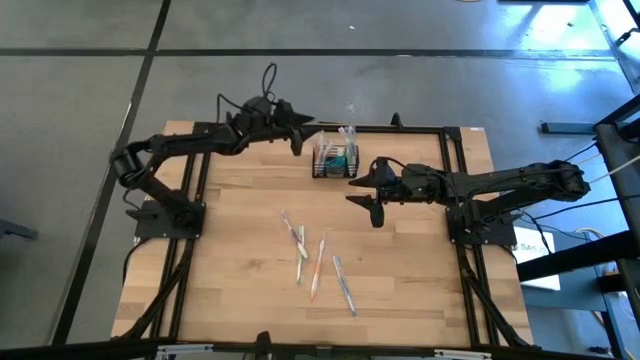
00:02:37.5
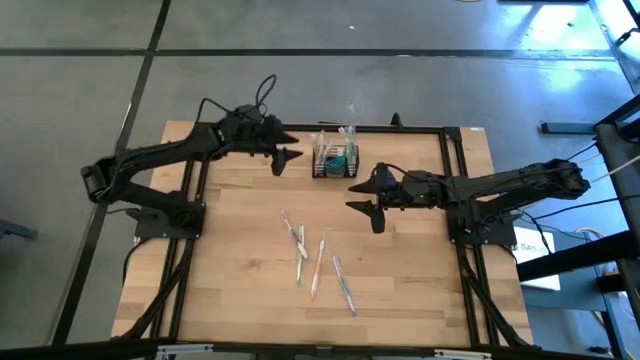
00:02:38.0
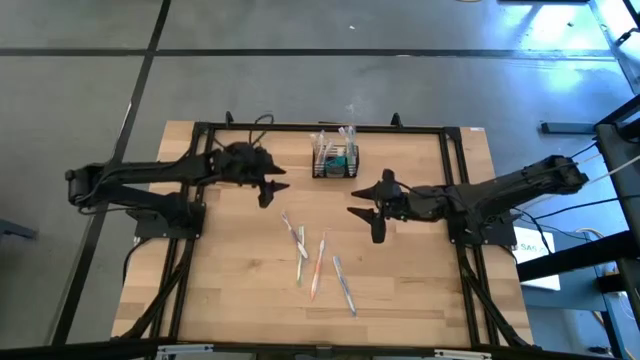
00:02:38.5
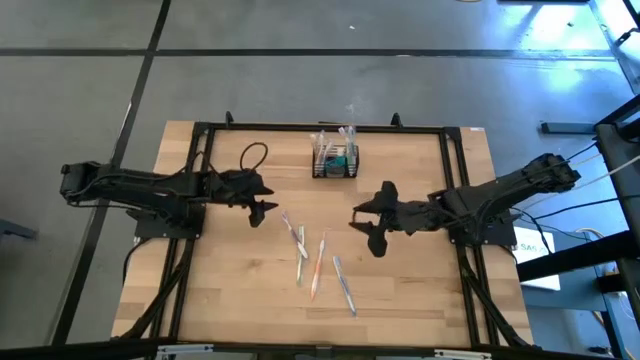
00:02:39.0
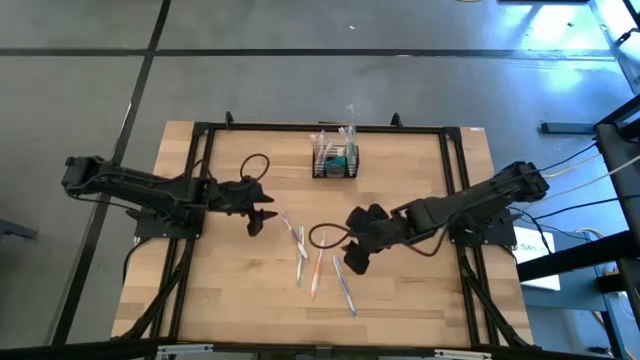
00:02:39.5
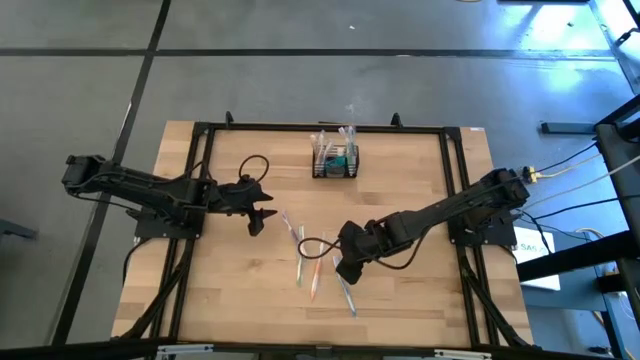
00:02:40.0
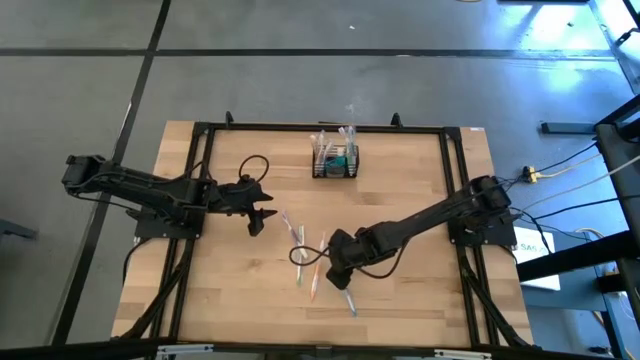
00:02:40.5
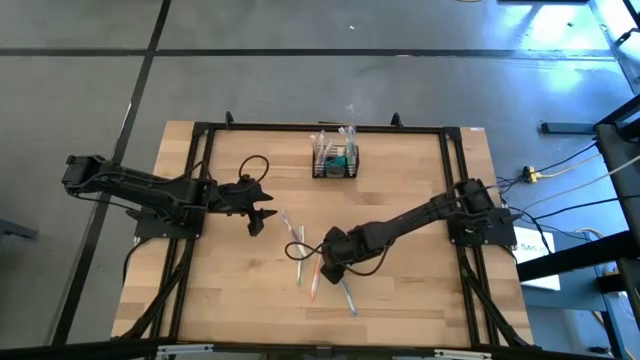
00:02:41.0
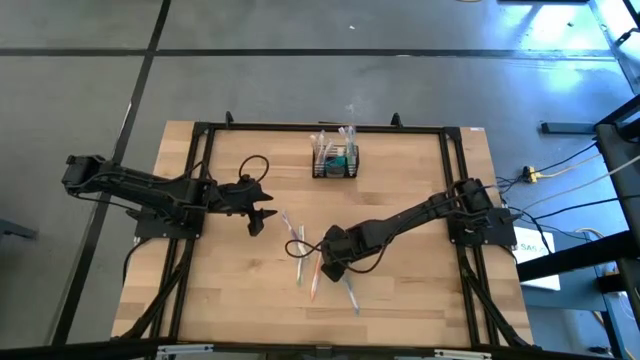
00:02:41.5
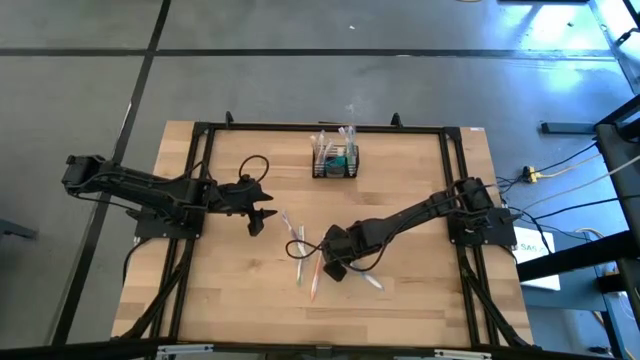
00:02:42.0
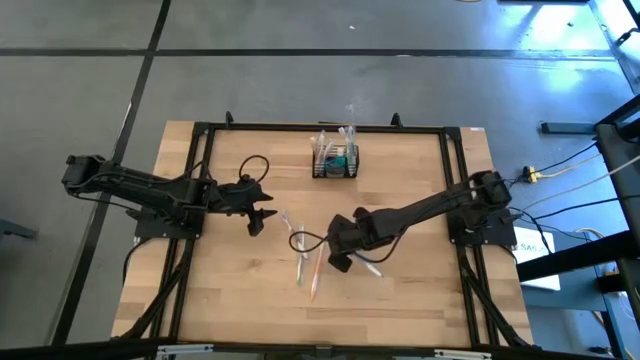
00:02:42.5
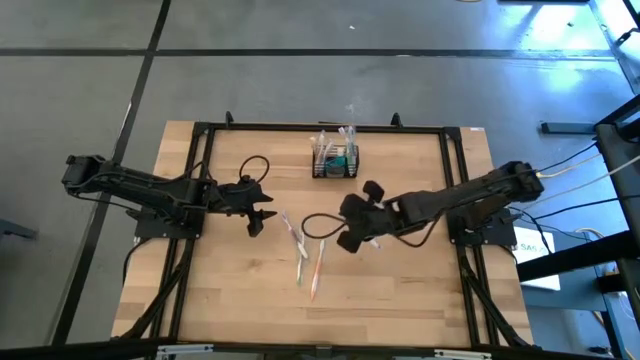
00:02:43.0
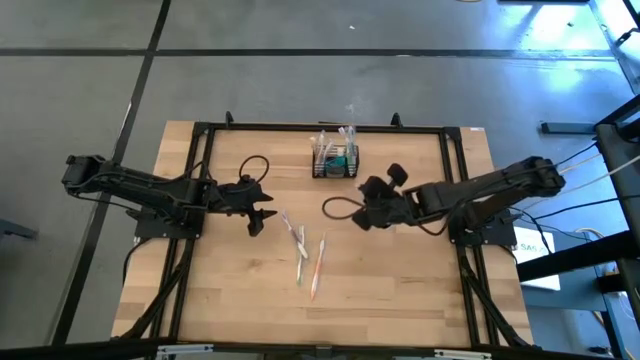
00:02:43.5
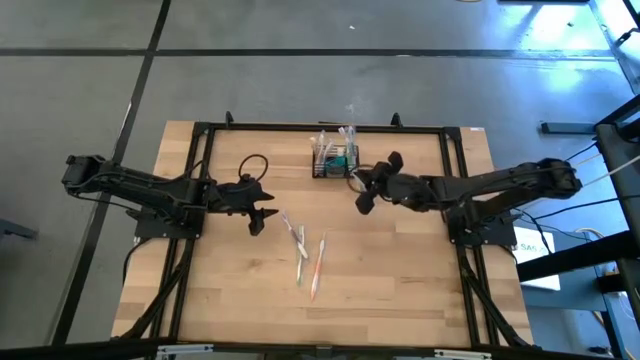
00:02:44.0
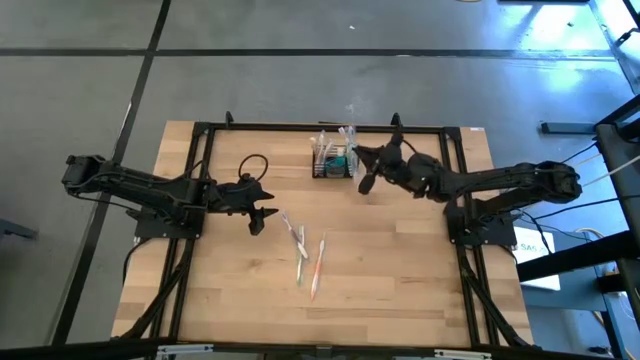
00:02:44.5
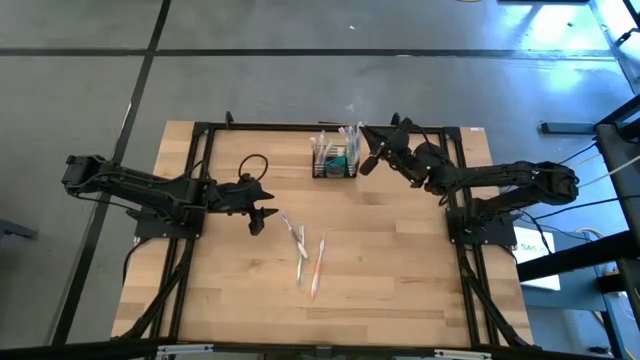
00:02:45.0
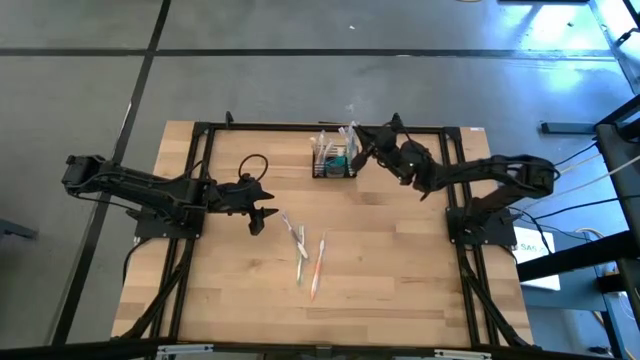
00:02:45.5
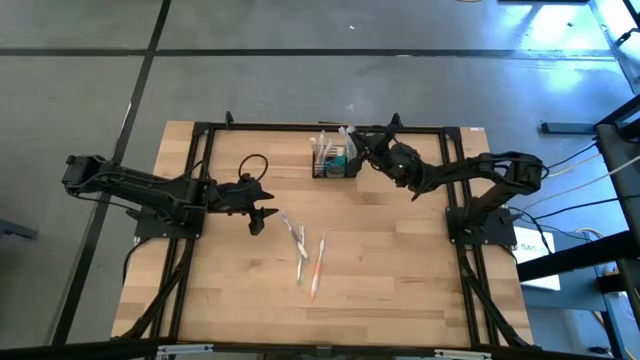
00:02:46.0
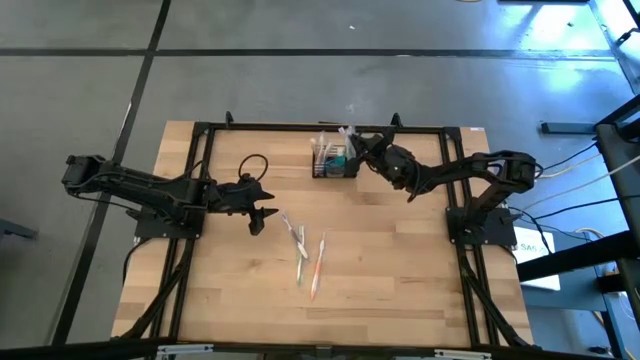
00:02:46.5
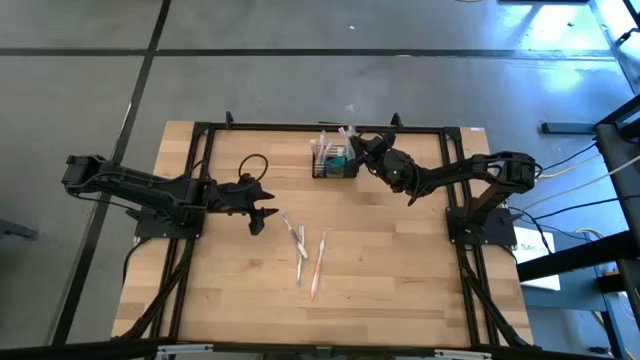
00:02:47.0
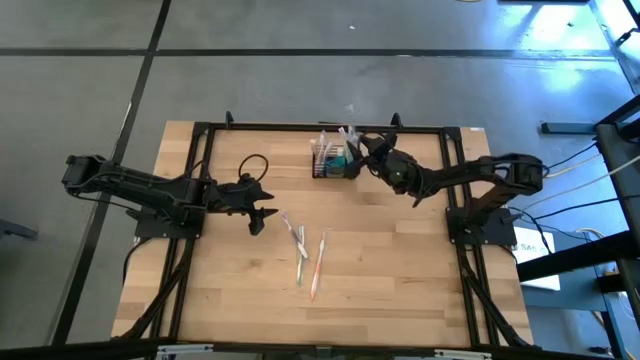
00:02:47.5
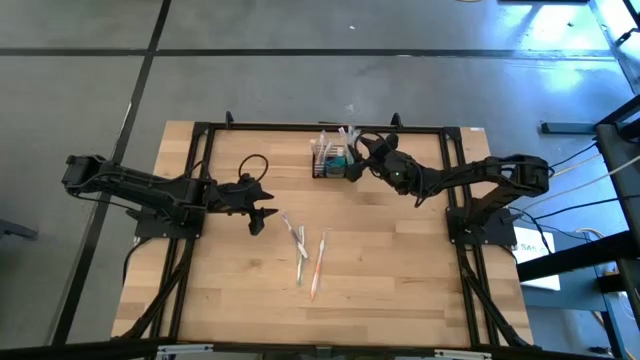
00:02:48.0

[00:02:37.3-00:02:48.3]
Task: Pick & Place toothbrushing station
Put the blue toothbrush in the right section of the wire organizer

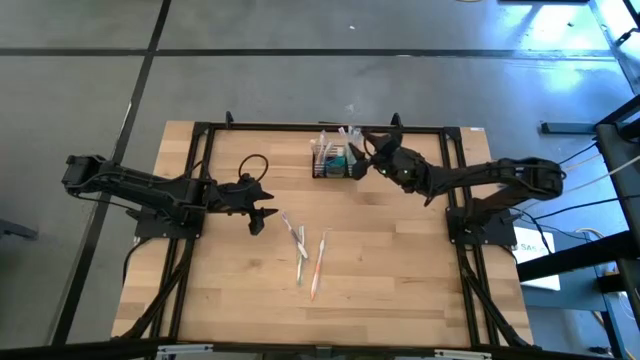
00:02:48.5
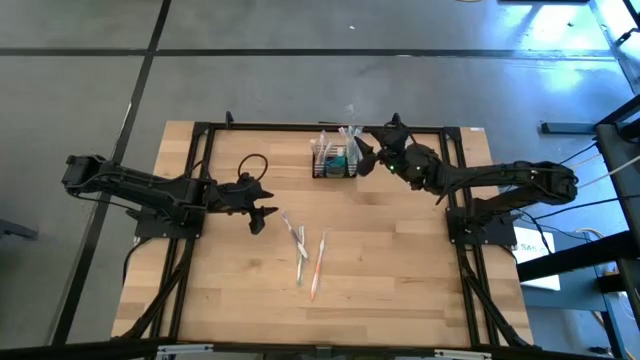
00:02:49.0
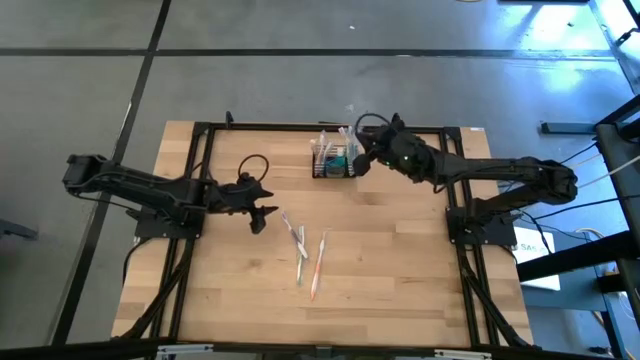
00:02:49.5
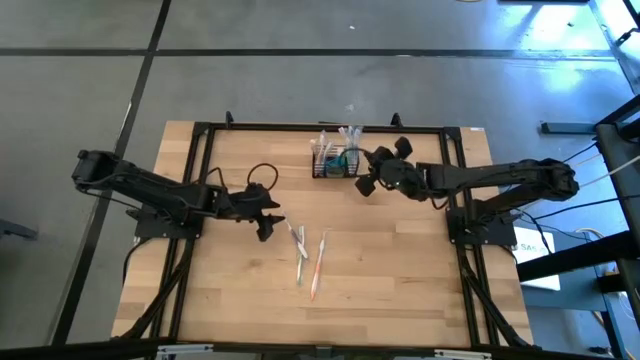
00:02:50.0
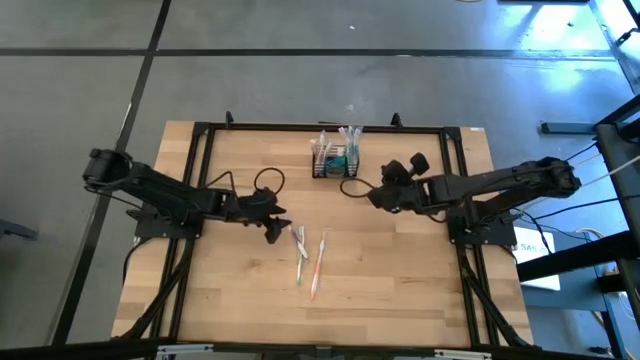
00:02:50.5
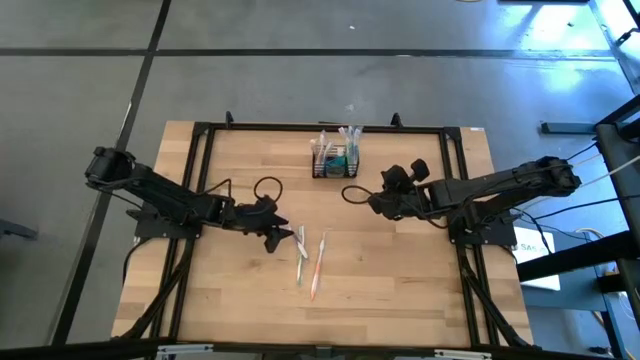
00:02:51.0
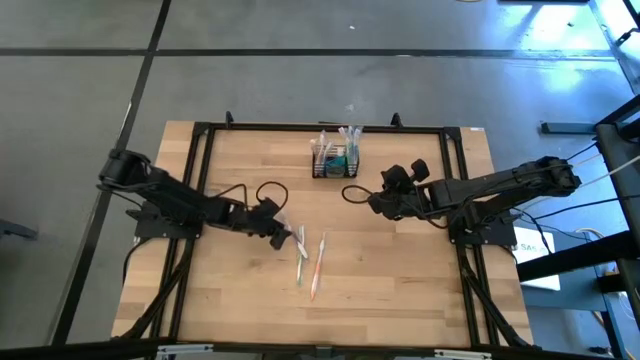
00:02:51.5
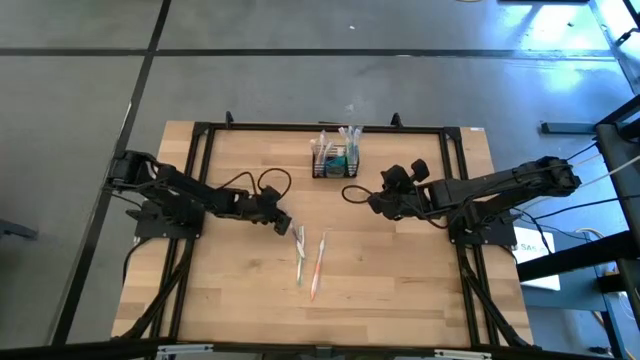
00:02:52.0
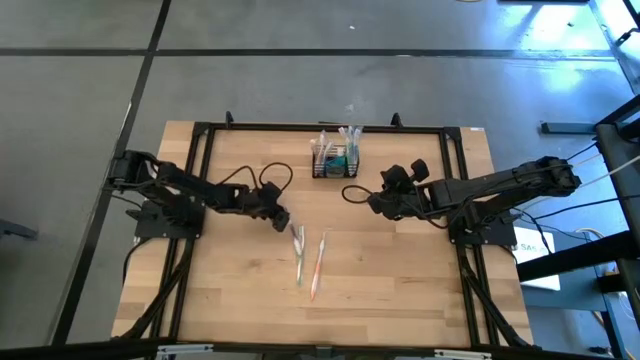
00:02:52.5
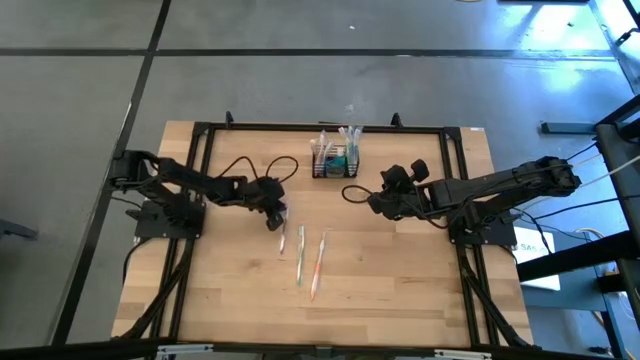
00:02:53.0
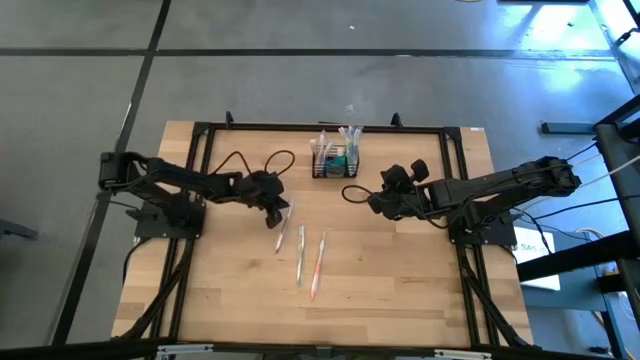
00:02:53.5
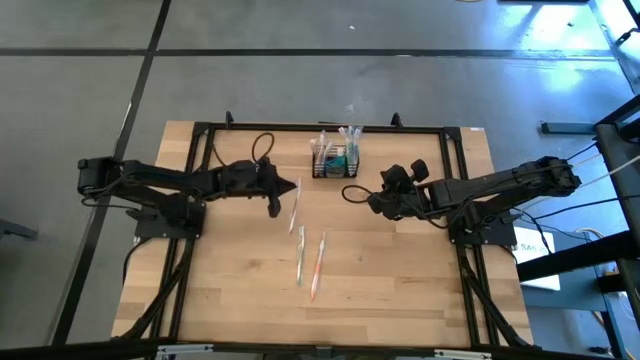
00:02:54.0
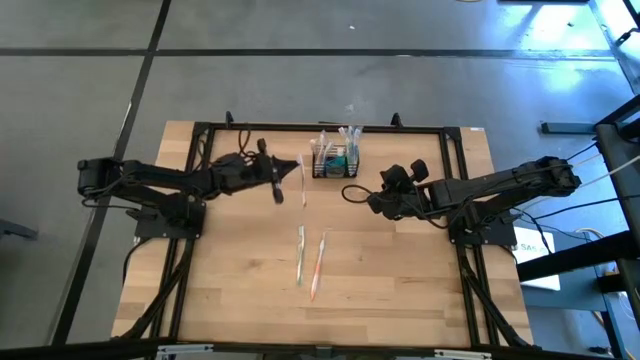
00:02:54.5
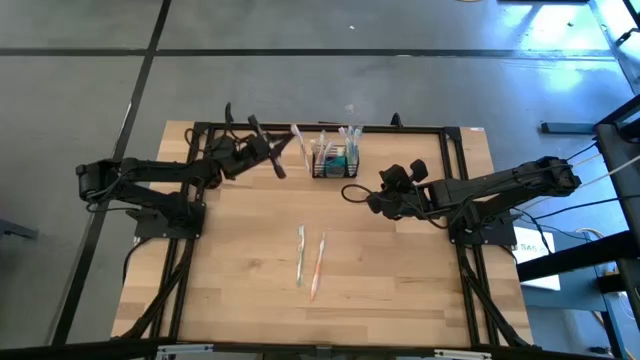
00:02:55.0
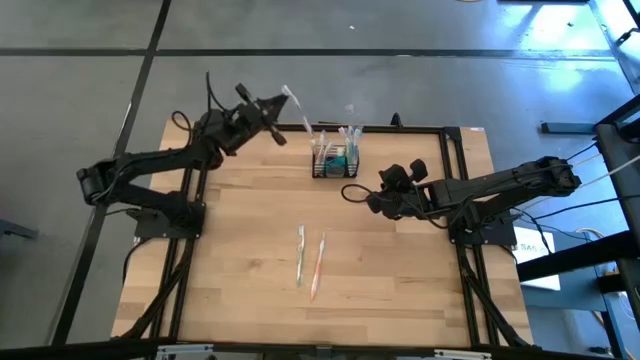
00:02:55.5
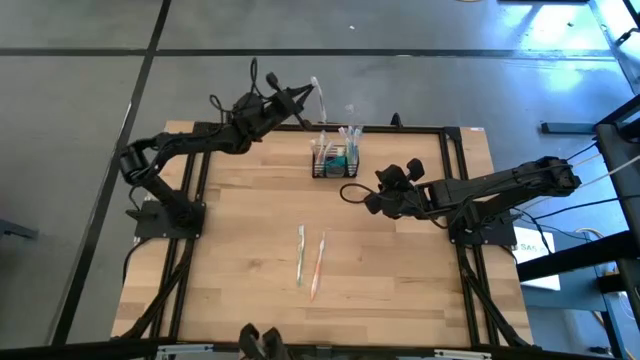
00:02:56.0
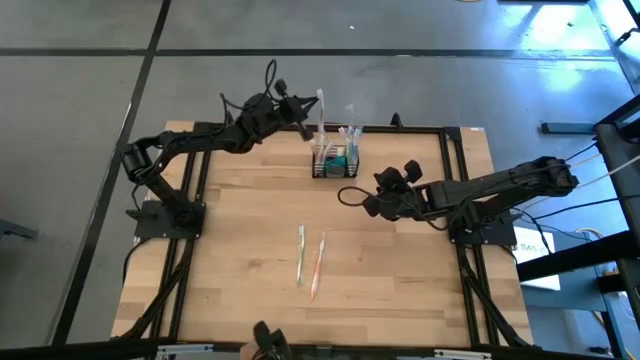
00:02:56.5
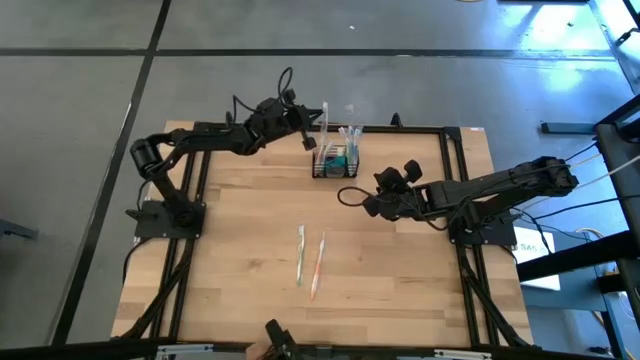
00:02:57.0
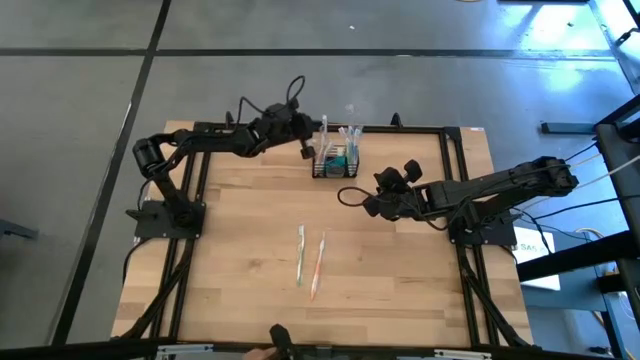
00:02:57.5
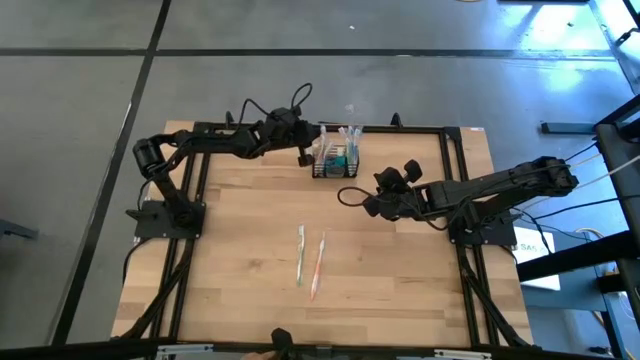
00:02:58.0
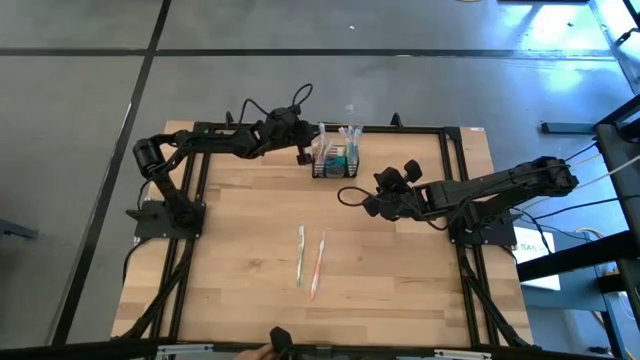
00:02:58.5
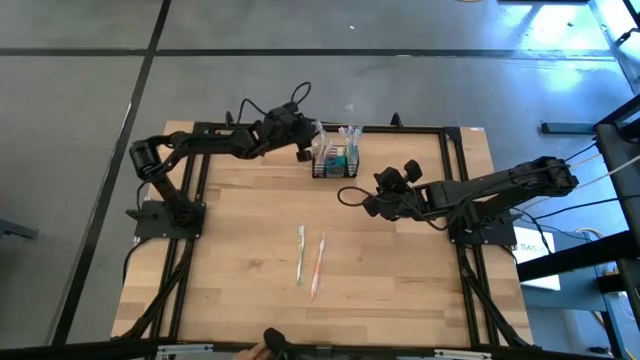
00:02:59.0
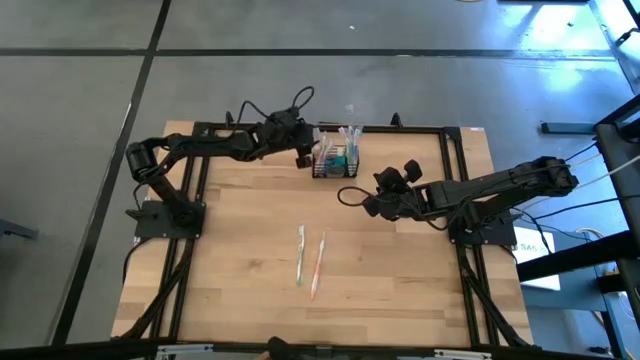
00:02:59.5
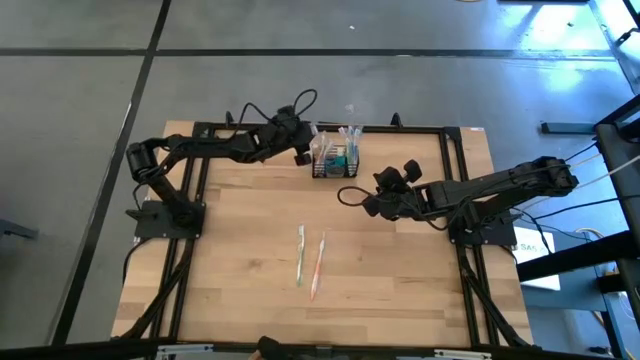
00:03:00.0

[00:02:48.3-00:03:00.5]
Put the purple toothbrush in the left section of the wire organizer
